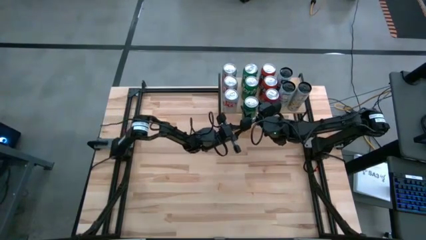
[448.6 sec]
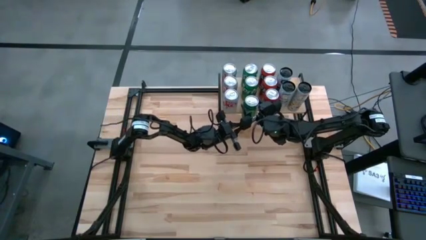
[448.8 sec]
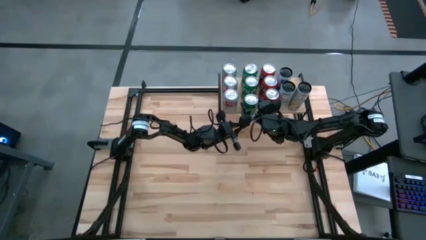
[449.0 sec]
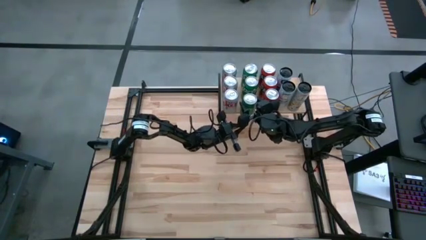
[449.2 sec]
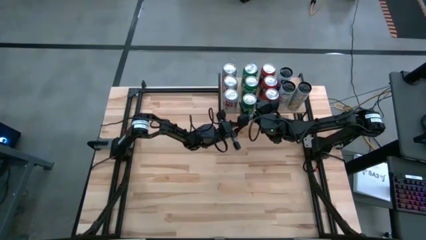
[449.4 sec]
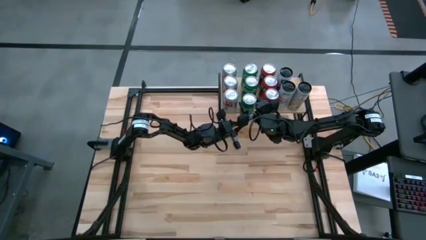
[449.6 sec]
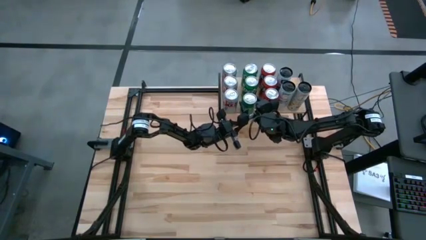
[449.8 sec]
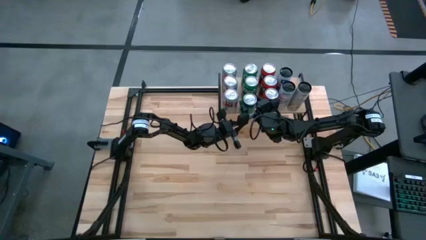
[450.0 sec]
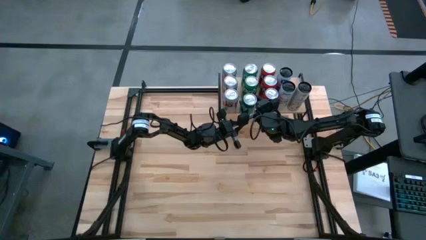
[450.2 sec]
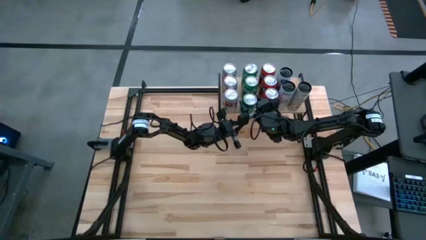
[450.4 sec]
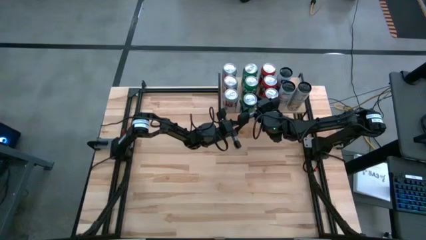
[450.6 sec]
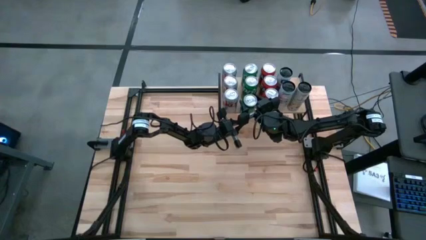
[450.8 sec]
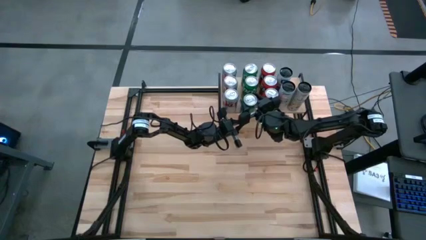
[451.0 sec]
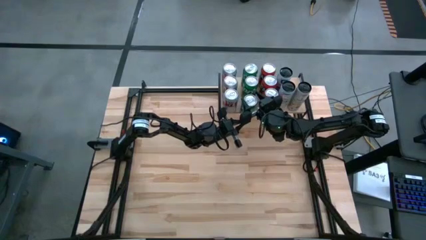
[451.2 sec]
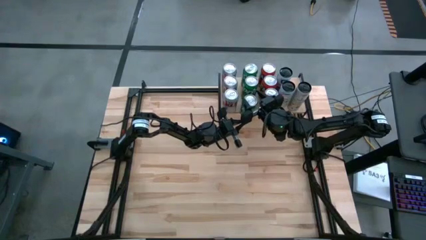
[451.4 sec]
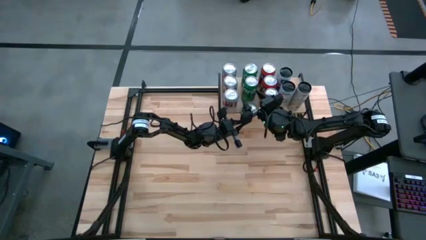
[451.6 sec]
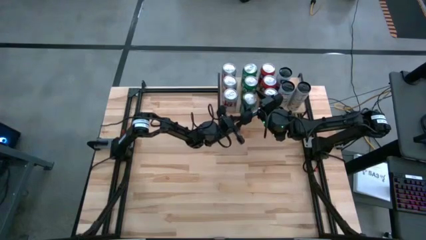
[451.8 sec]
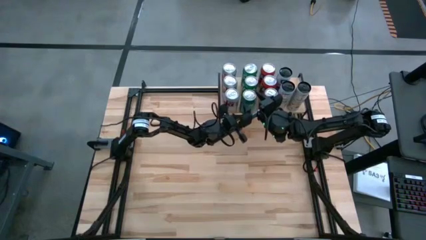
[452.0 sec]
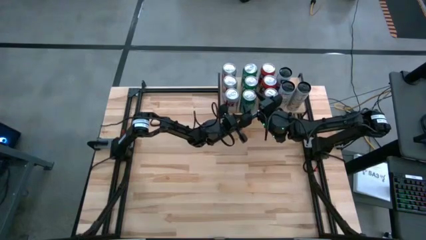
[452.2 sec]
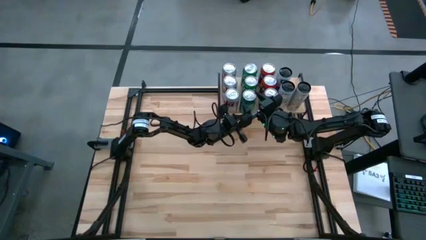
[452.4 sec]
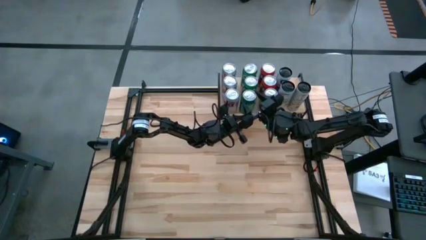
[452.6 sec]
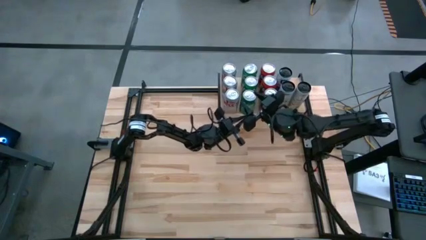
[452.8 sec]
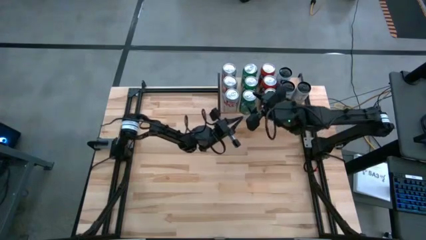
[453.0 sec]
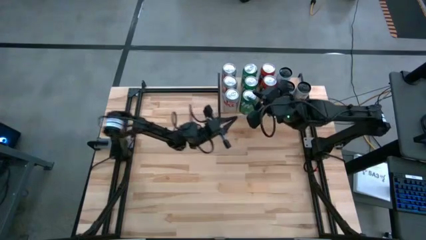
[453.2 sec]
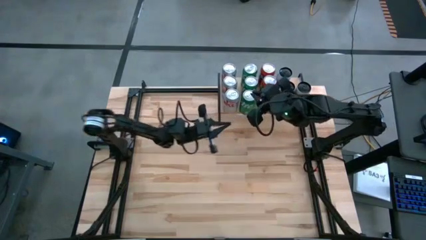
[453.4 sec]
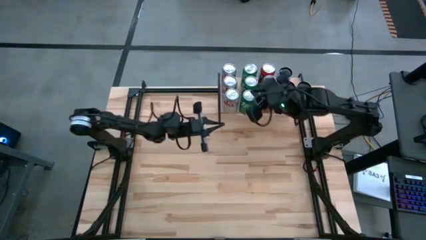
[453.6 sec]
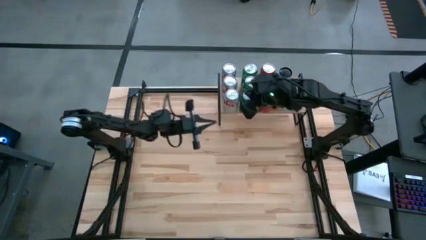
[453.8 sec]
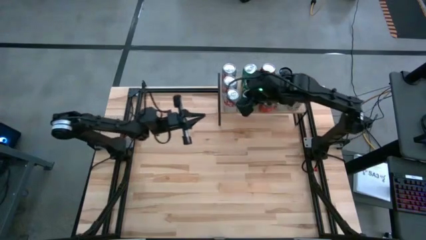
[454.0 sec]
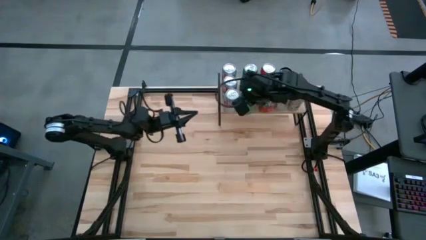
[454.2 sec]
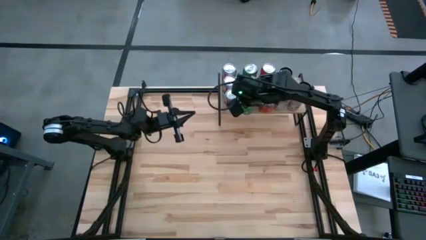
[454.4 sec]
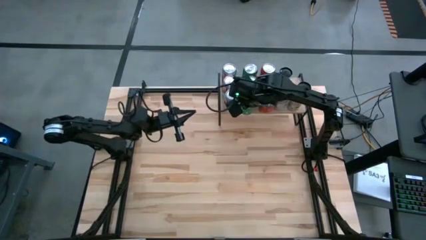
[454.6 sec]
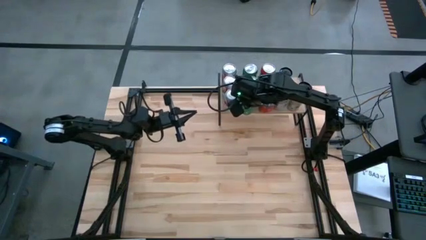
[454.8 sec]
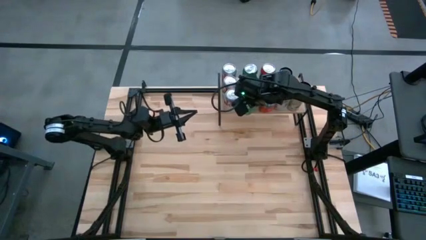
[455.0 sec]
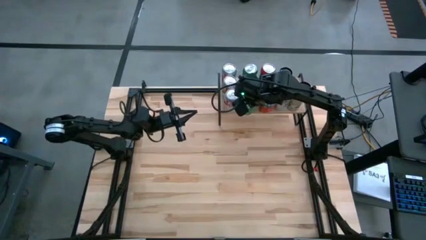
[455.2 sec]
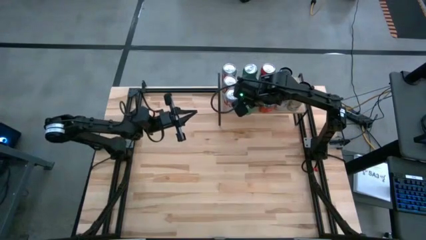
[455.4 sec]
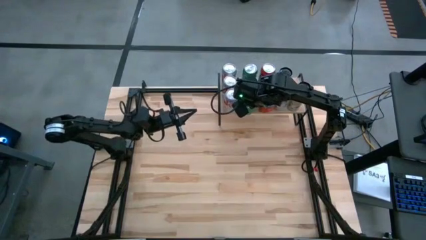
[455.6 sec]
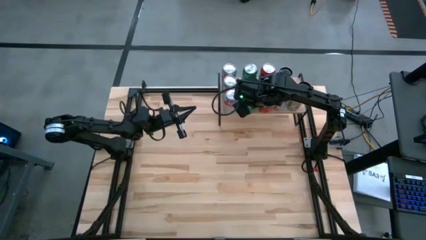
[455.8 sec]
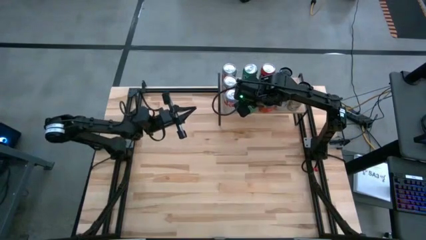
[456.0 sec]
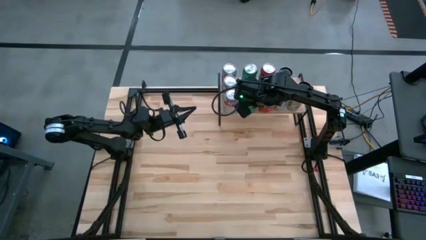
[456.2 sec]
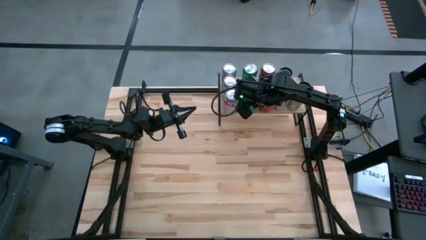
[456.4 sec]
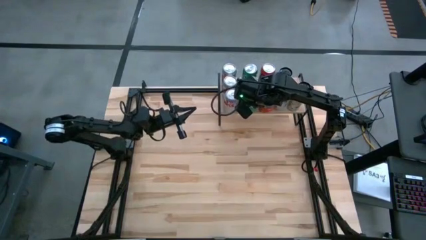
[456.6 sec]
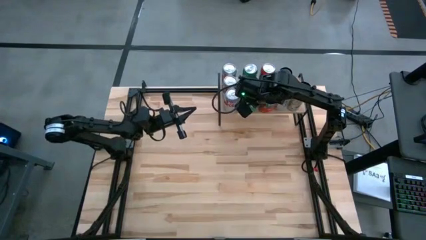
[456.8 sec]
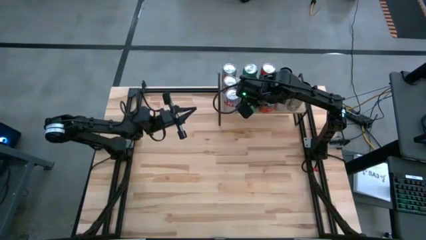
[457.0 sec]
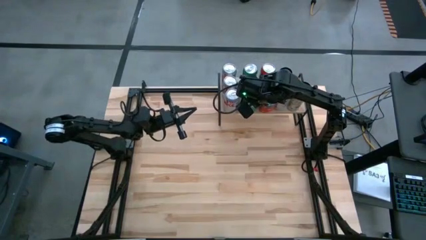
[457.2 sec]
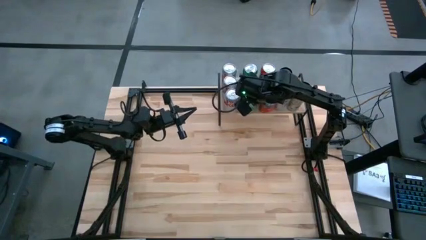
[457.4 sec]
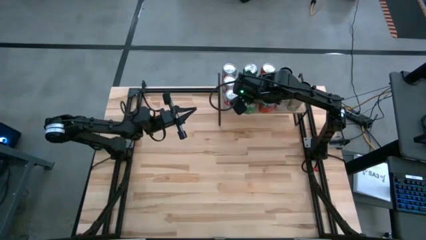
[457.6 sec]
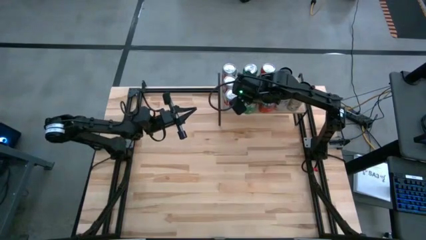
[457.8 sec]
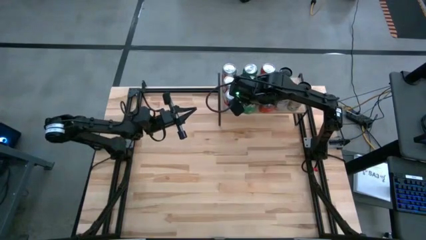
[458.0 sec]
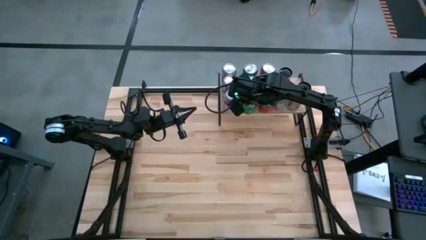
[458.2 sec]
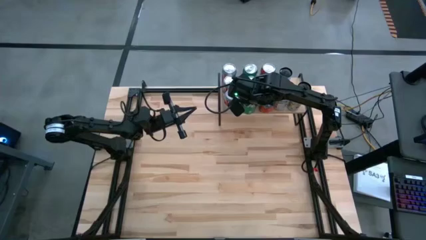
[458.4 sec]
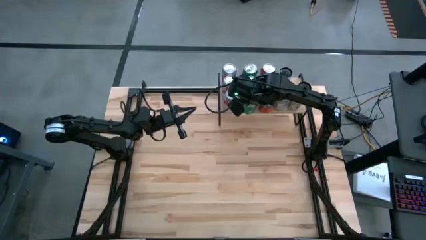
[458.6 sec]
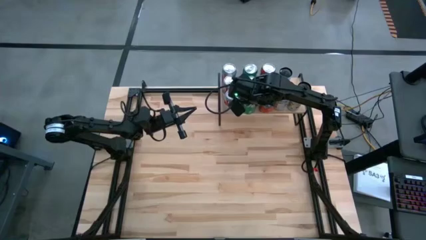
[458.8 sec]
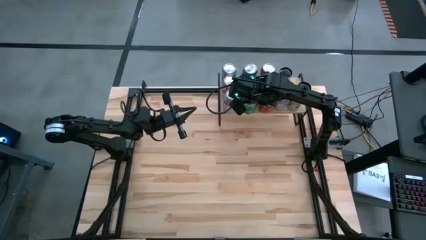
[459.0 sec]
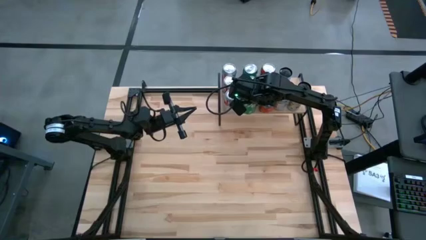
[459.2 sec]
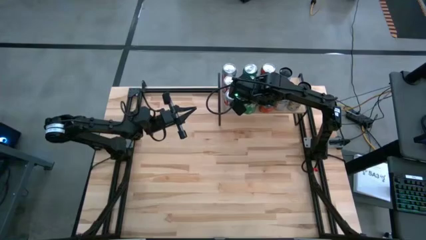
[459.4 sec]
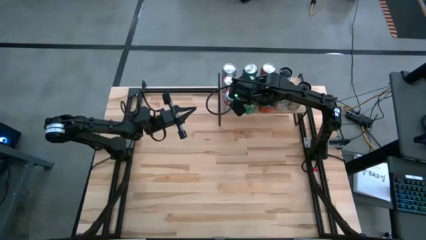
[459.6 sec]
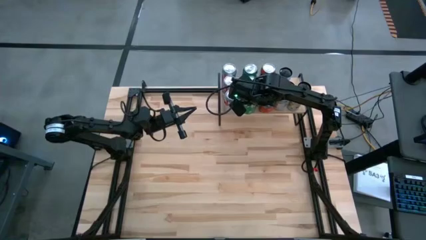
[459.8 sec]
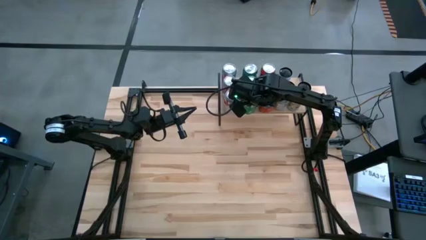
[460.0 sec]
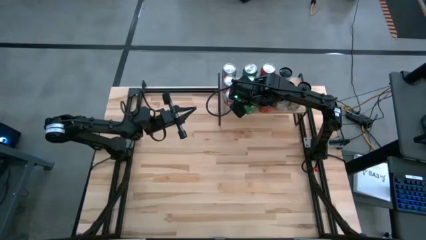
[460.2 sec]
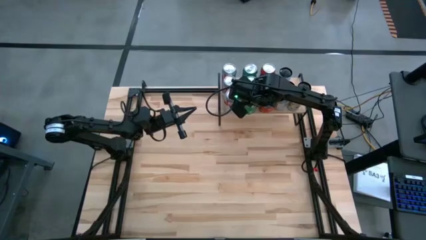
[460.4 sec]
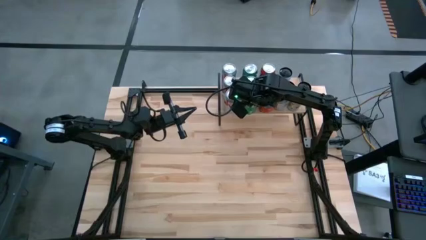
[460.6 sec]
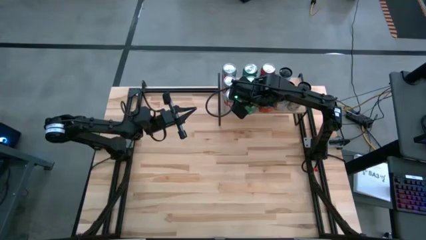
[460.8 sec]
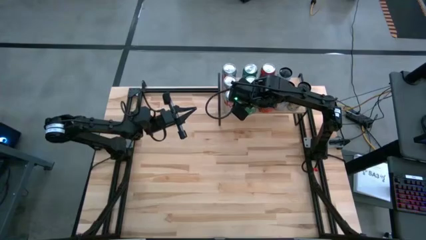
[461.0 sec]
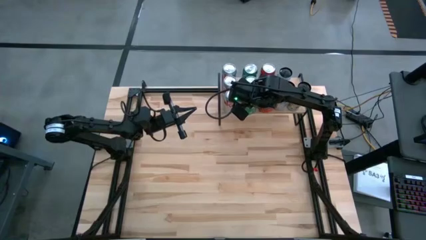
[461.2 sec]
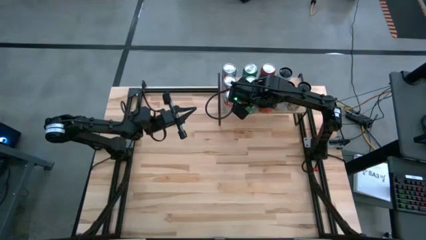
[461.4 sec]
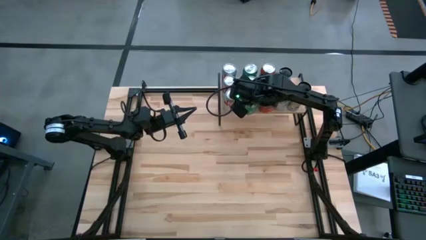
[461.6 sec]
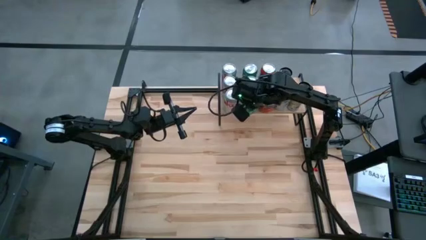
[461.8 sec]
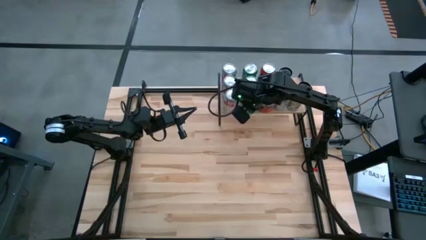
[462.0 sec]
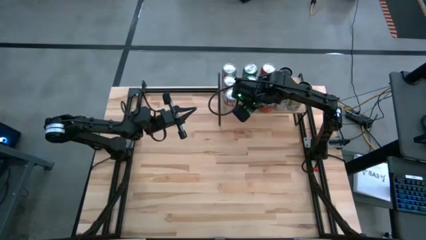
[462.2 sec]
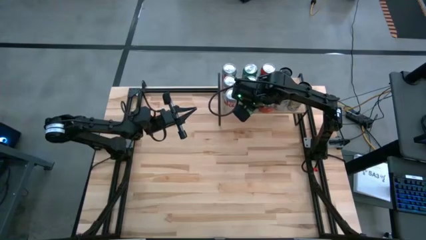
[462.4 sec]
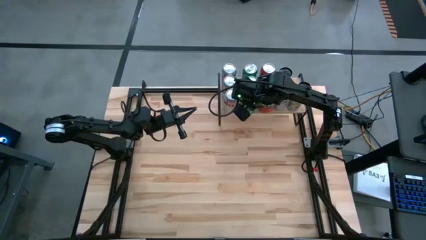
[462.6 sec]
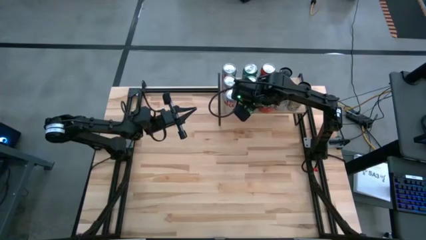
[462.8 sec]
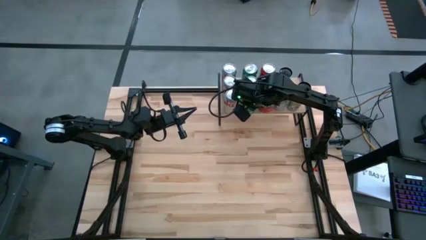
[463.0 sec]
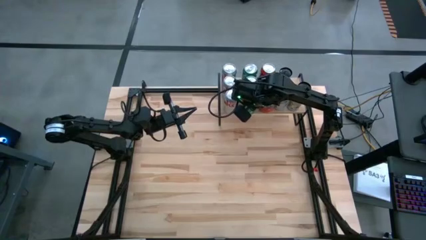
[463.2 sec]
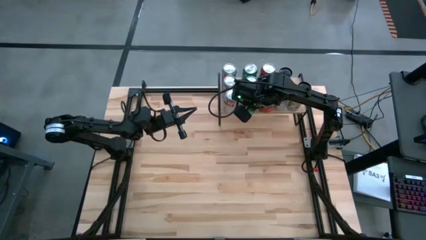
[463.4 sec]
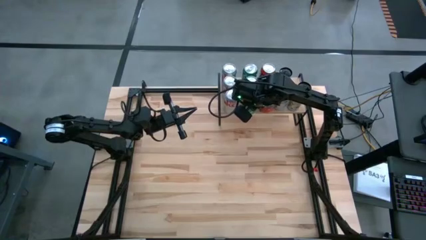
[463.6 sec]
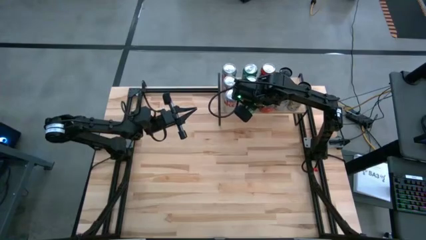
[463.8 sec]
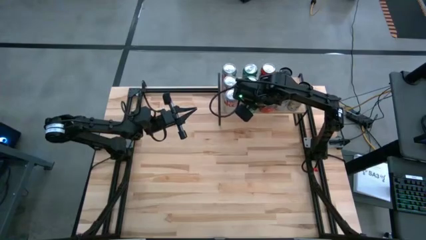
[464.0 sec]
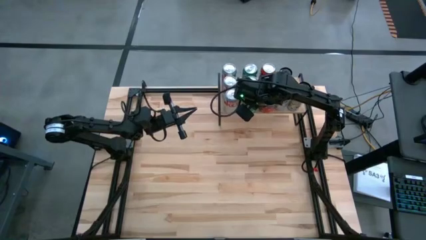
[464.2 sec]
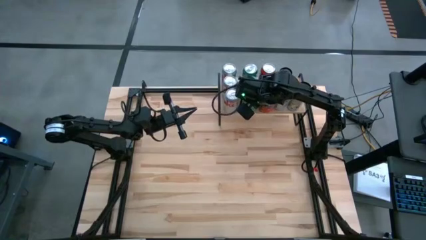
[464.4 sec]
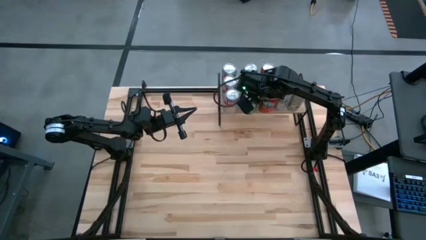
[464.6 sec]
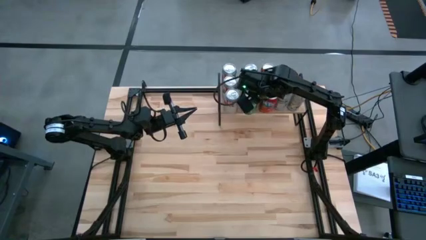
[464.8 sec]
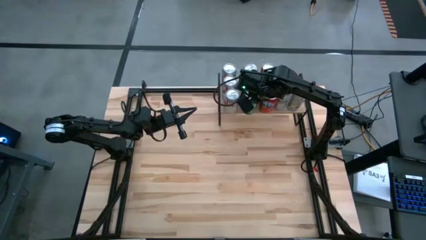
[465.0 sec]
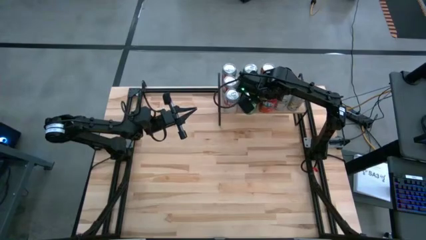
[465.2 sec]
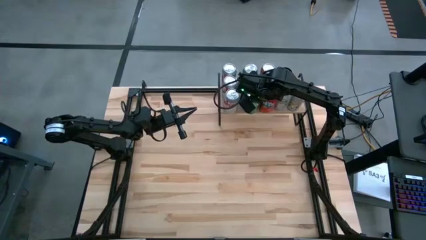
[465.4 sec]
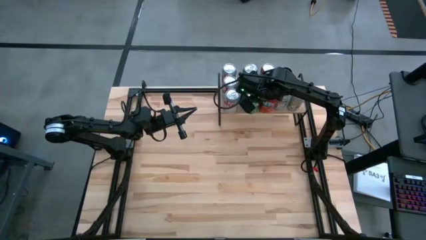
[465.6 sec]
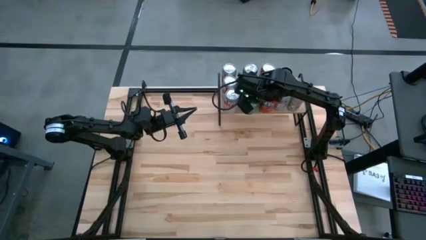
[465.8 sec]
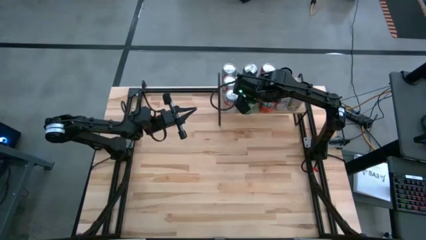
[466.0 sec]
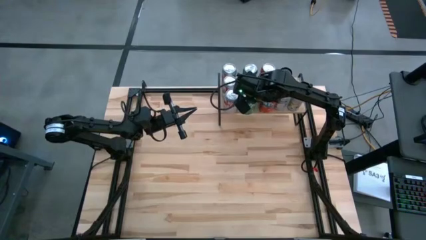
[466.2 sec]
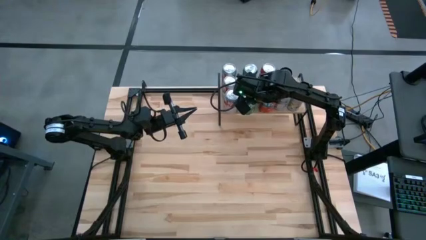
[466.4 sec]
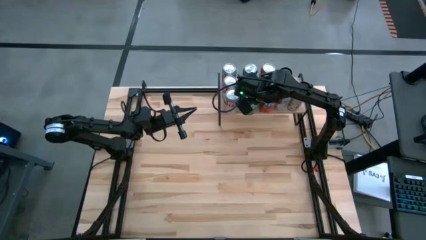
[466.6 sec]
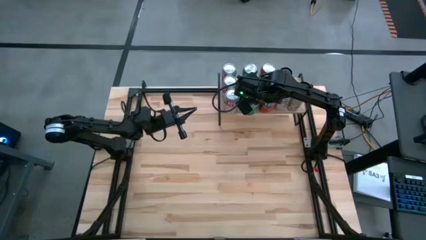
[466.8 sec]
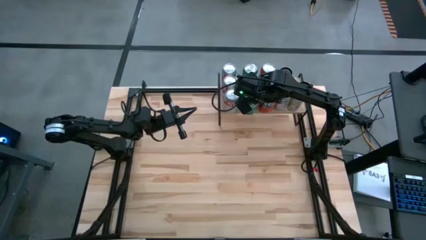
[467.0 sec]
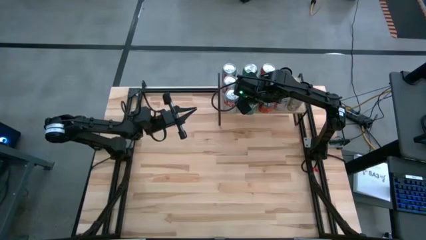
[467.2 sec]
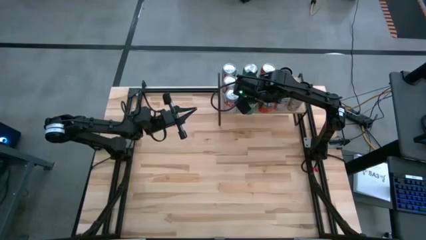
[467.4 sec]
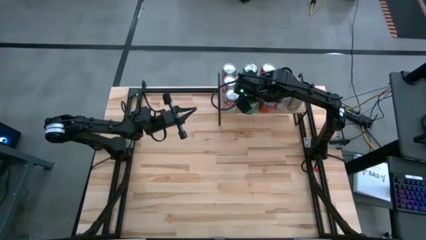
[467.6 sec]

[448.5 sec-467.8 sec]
Task: Place canned beverage on shelf
Put the green soda can on the shelf aligned in front of the other green soda can
